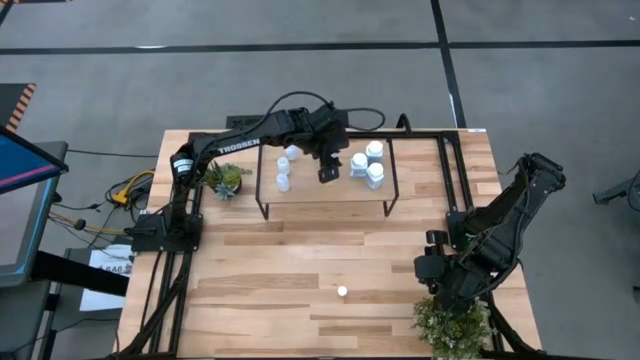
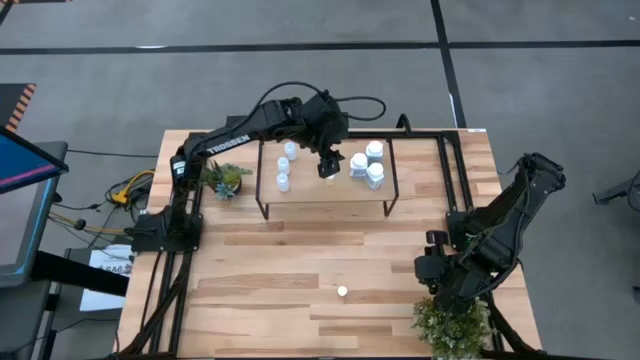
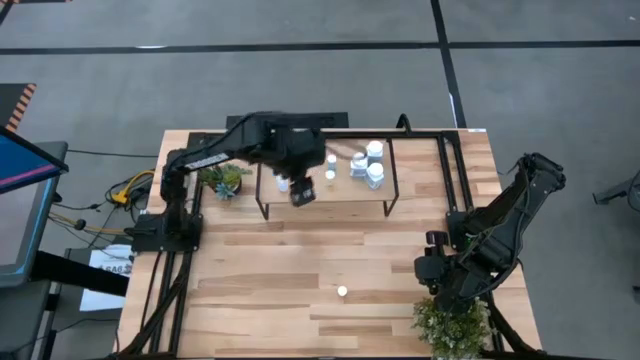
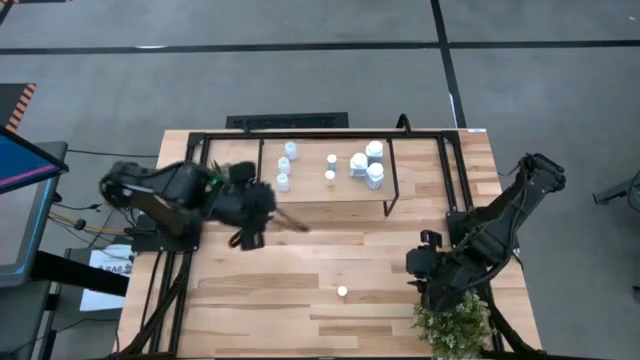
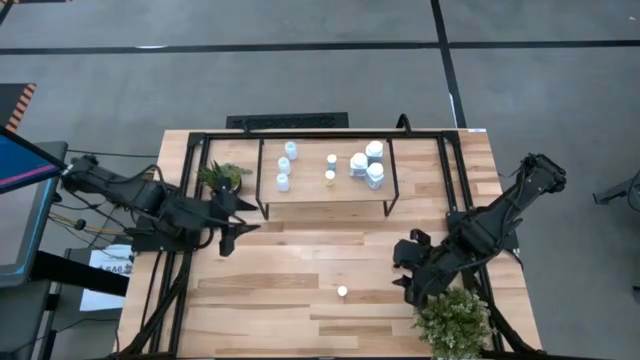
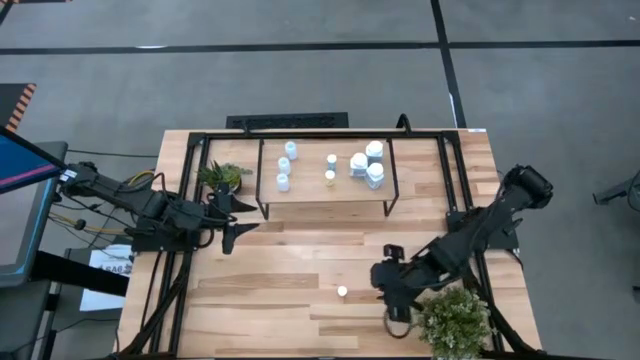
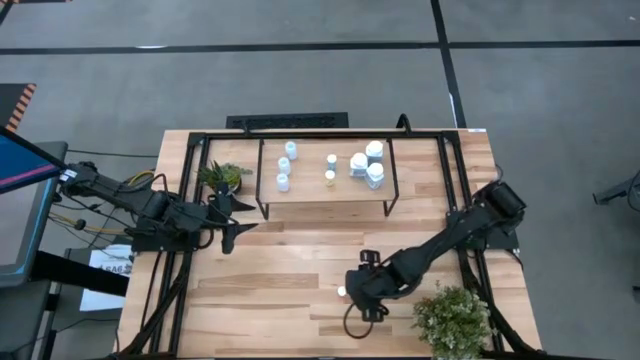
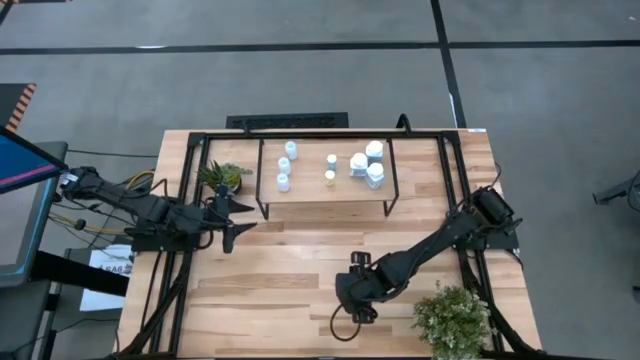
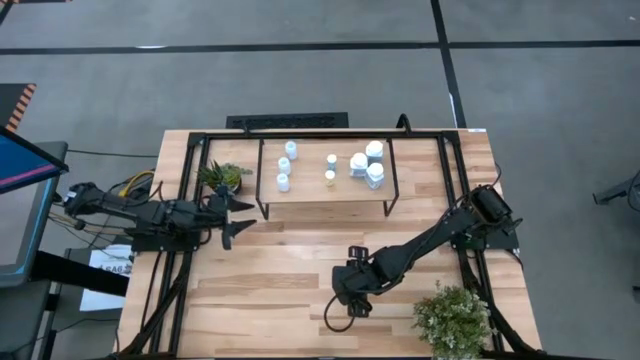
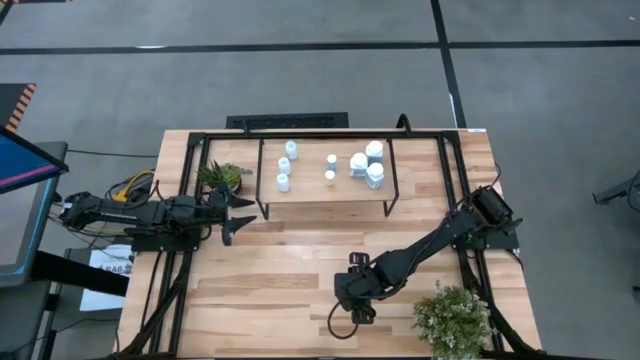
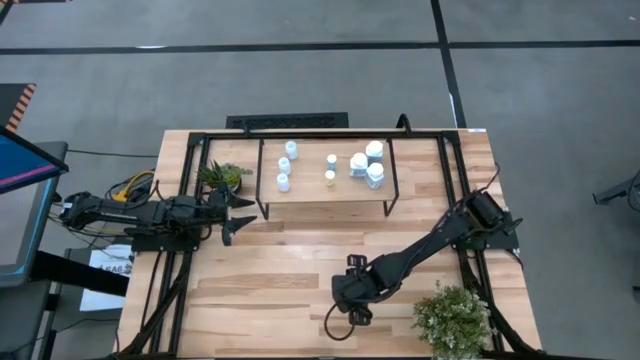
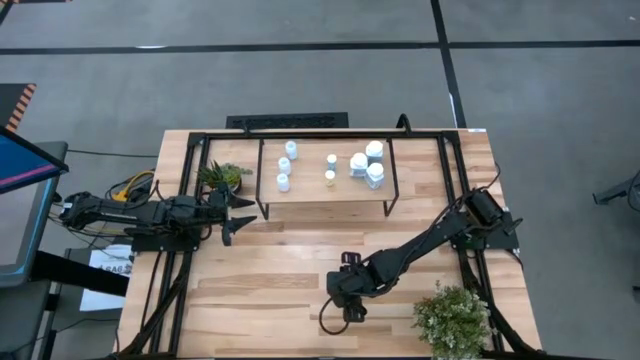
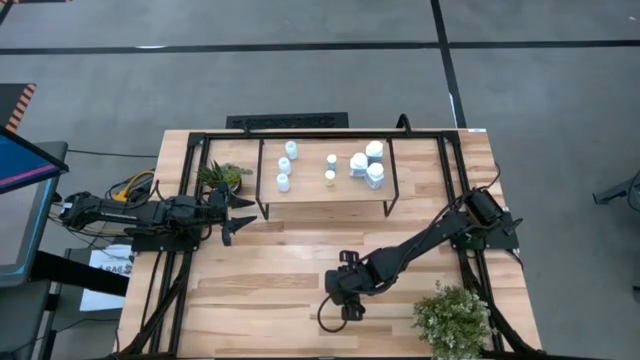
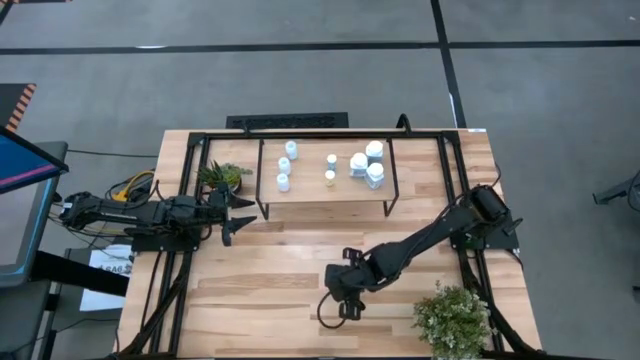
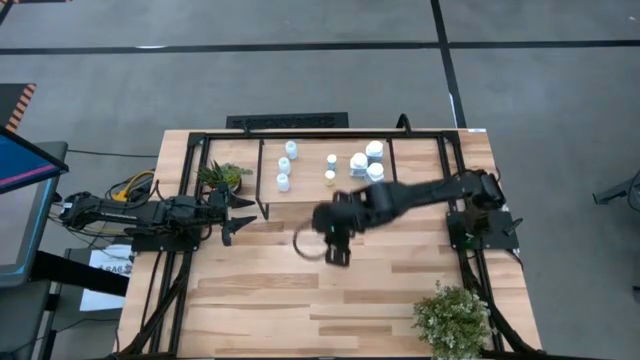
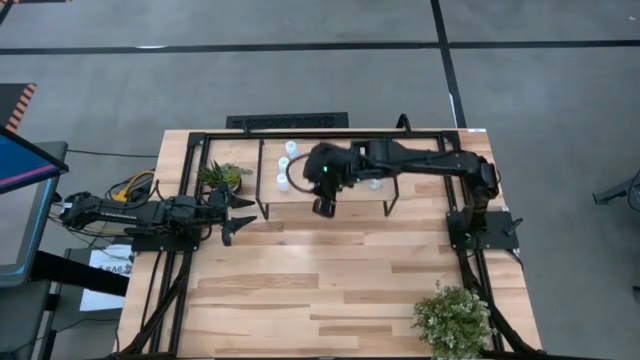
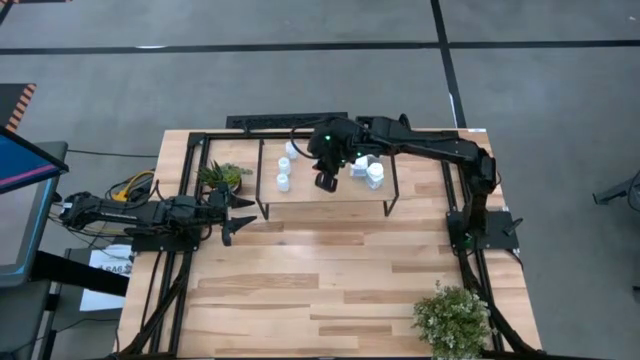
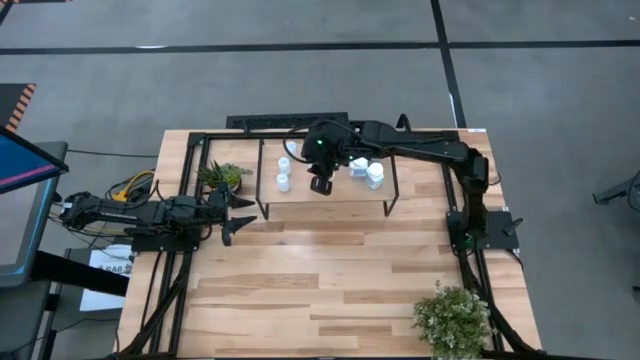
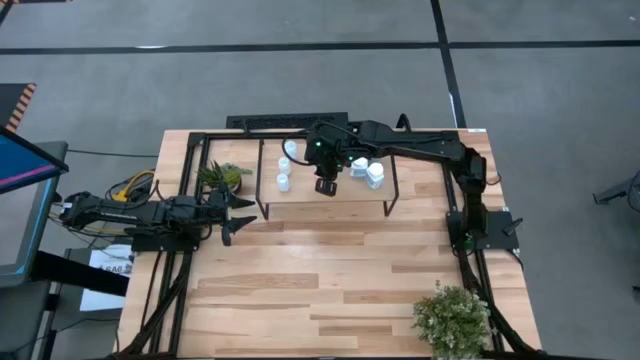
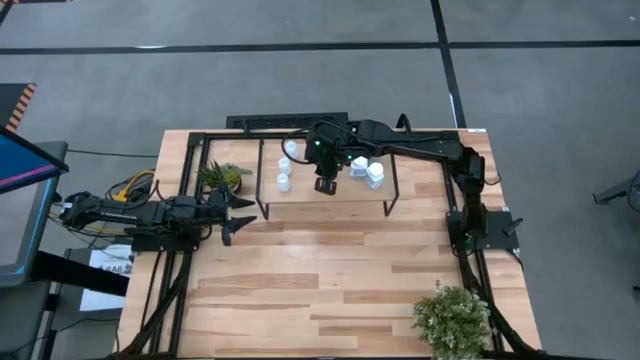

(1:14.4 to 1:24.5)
Task: Pick and place medicine bottles onto shelf by color
Put the pink pill bottle on the shelf

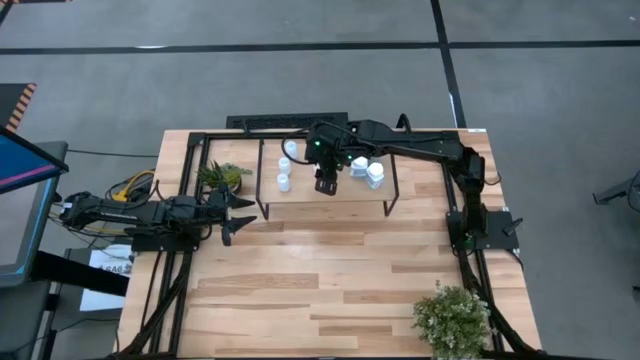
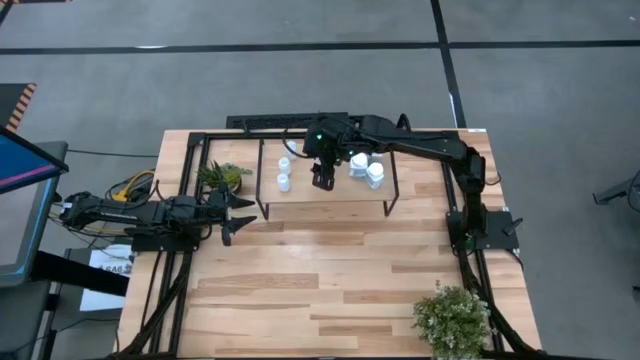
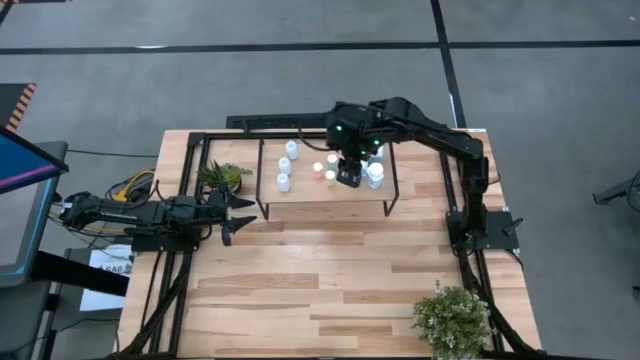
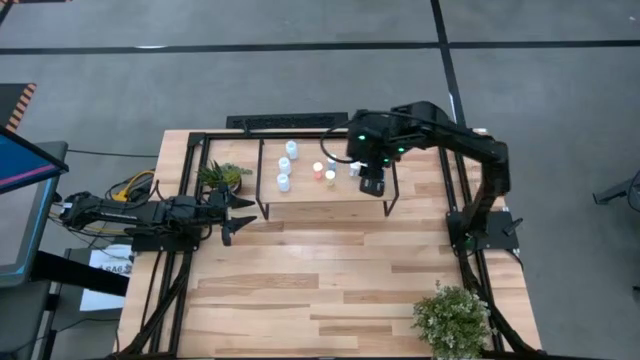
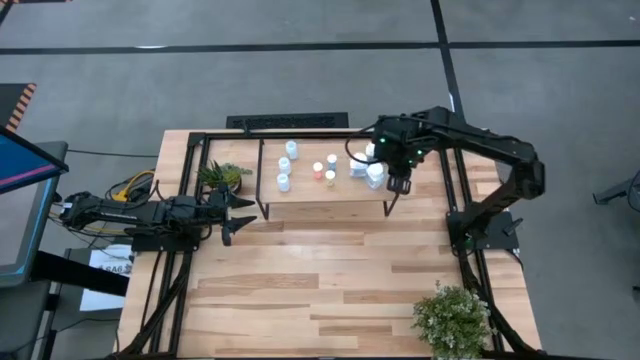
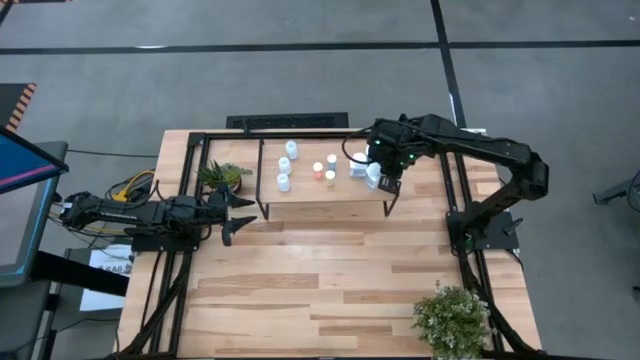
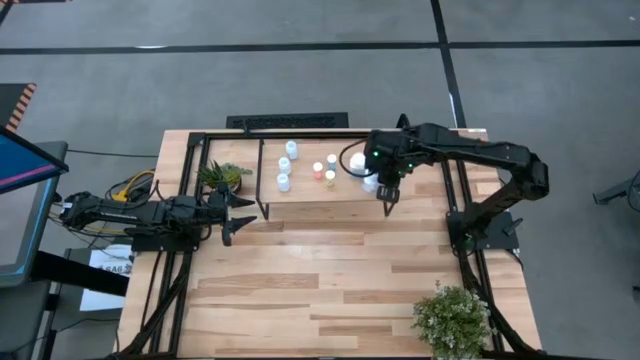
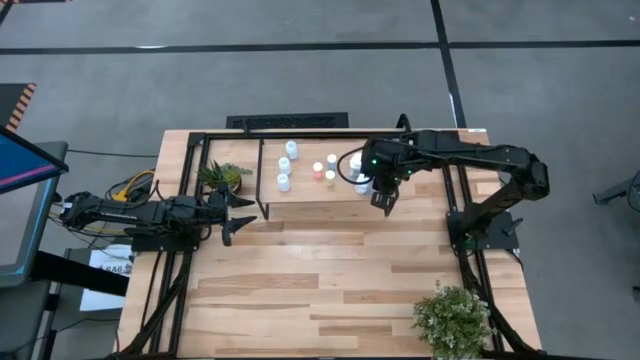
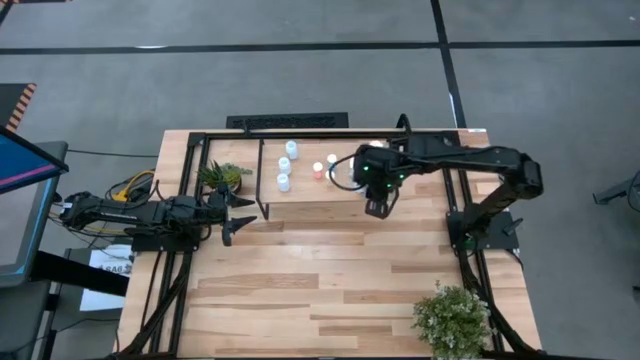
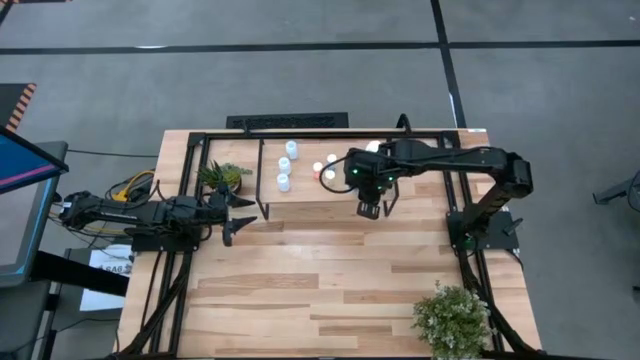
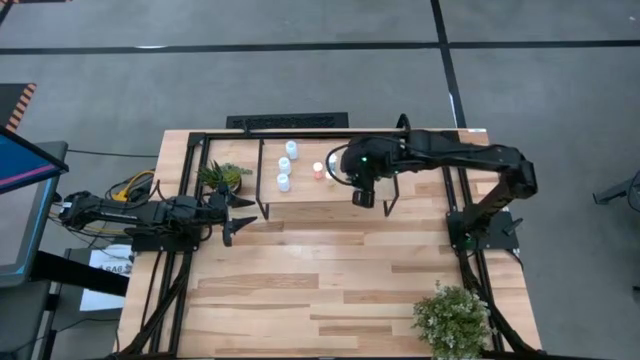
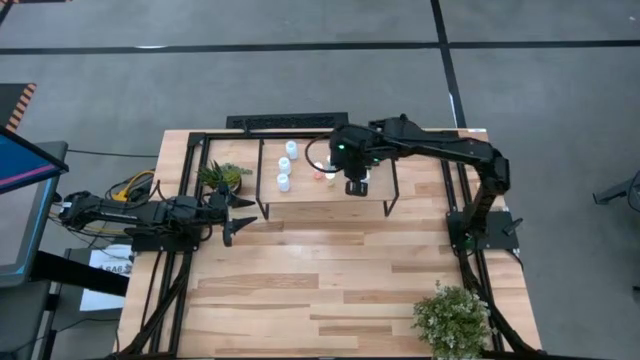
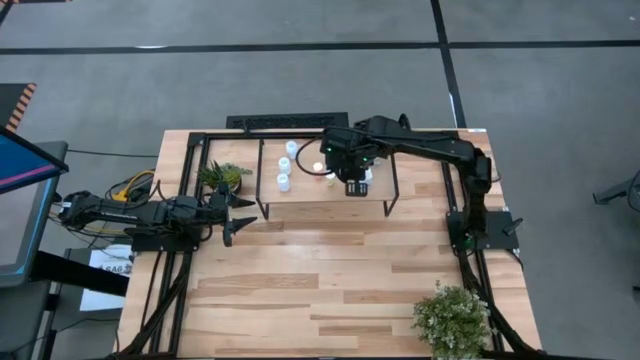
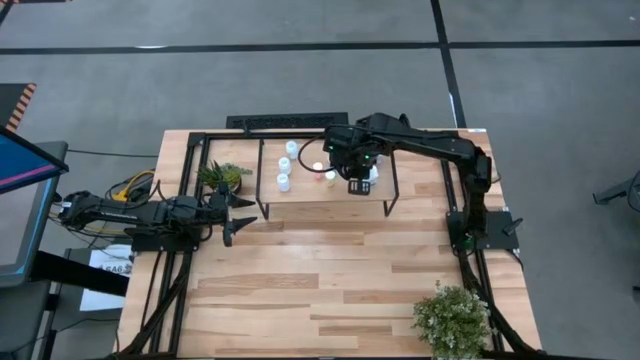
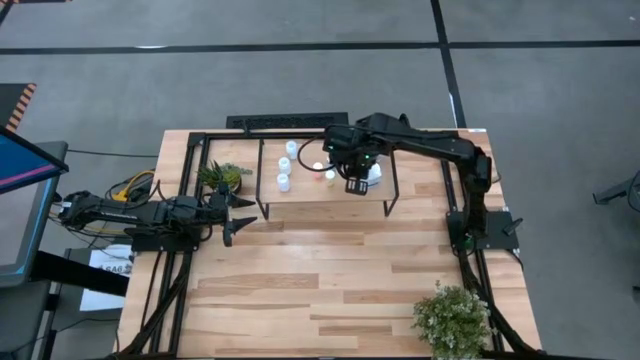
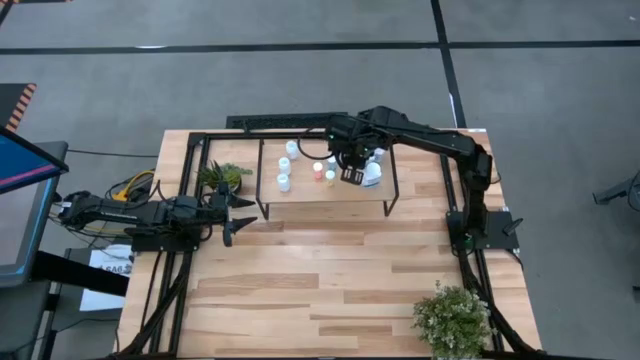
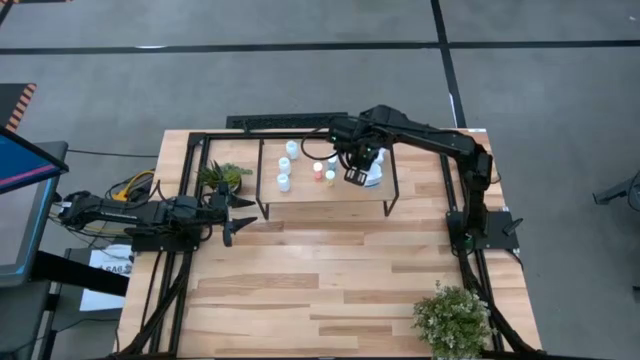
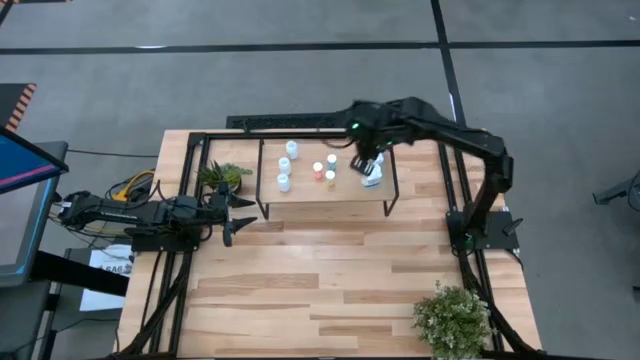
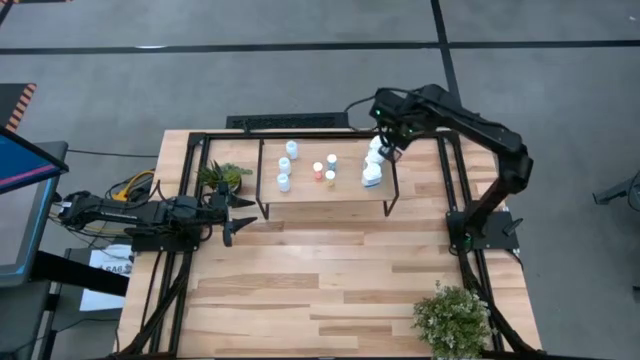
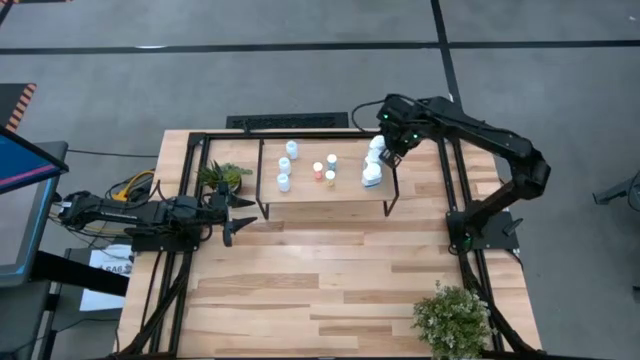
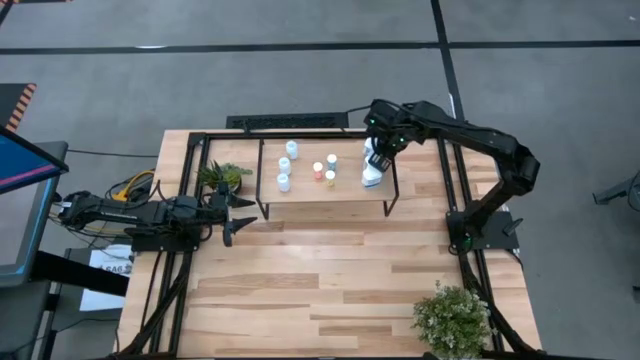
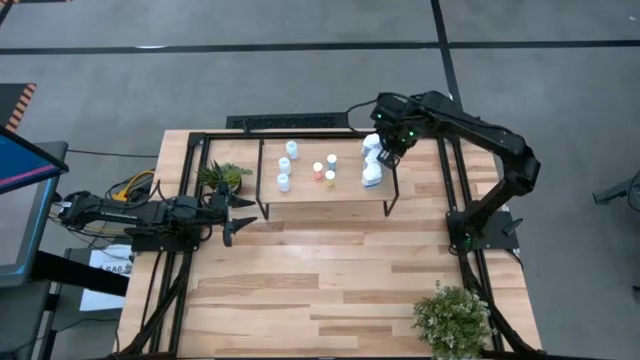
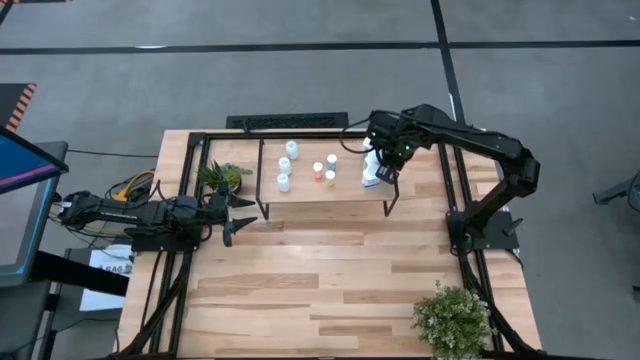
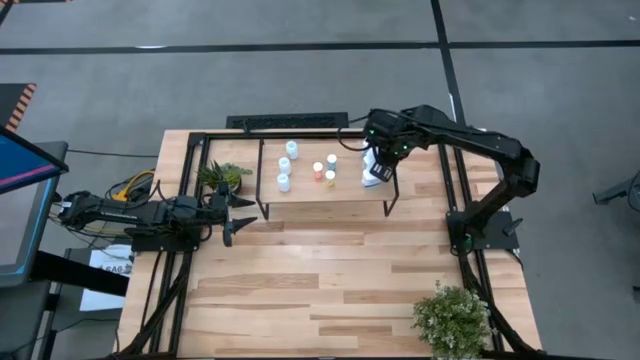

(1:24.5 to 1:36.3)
Adjust the white and blue pill bottles on the shelf

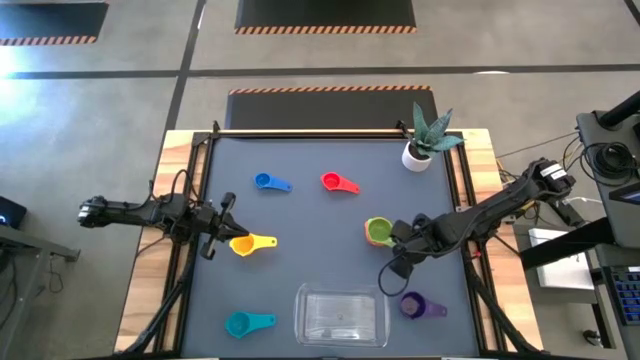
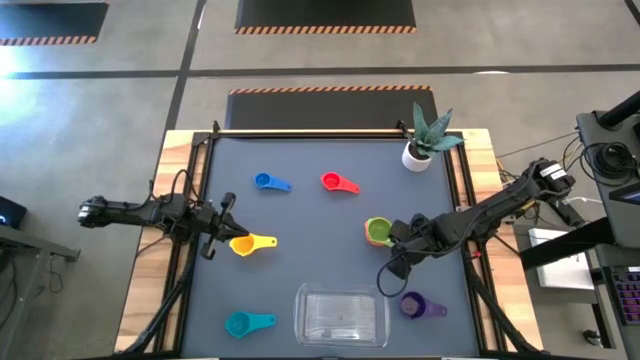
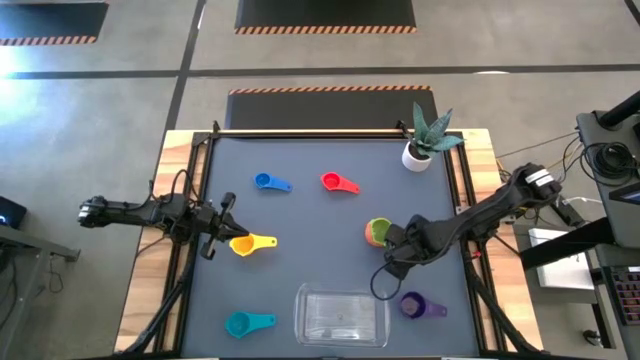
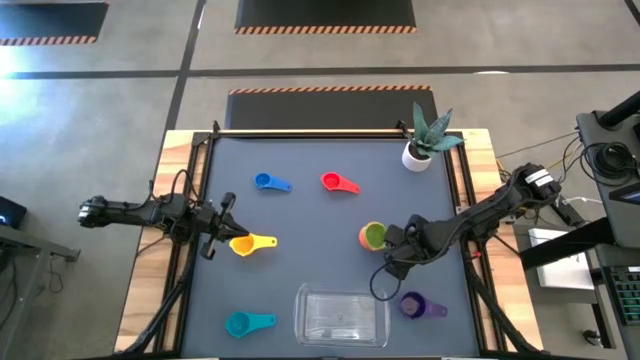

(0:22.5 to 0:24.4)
Task: Nest measuring cups in basket
Adjust the green measuring cup
